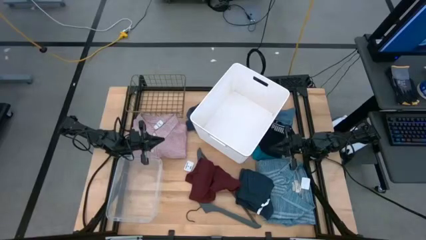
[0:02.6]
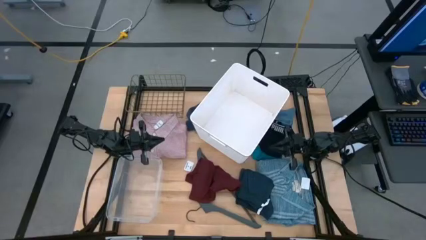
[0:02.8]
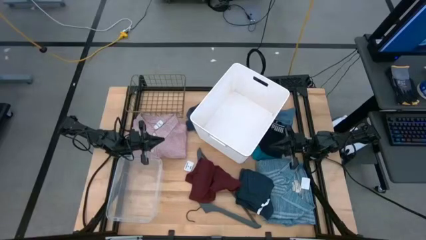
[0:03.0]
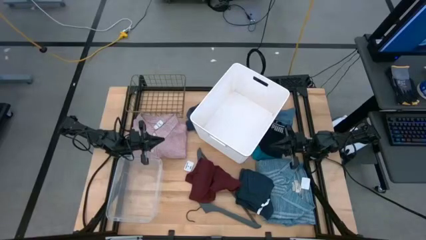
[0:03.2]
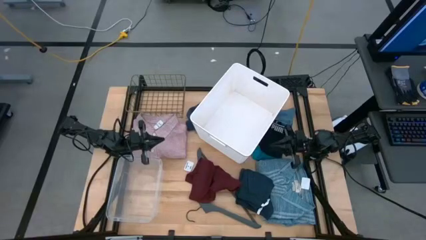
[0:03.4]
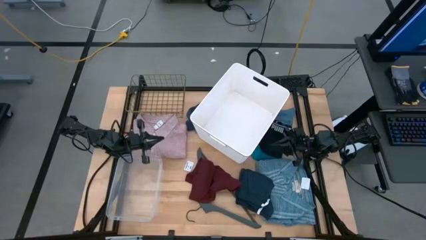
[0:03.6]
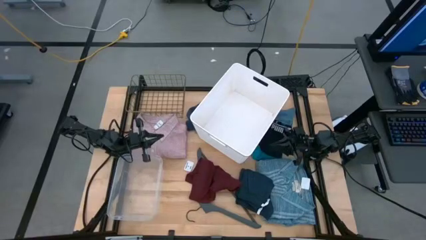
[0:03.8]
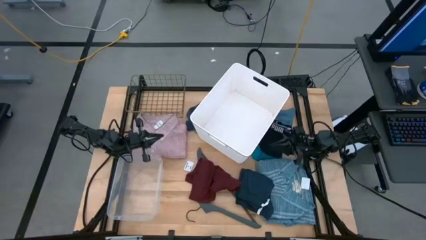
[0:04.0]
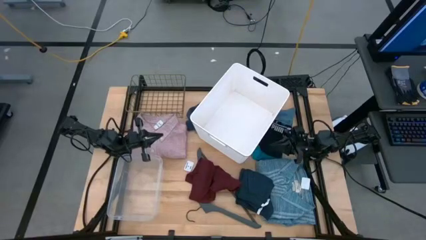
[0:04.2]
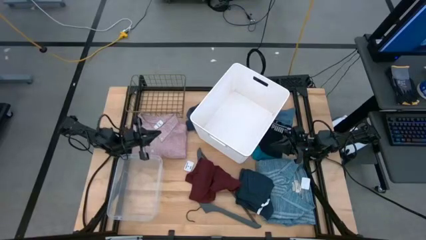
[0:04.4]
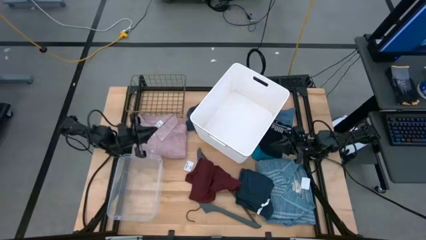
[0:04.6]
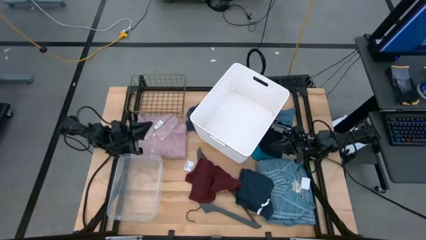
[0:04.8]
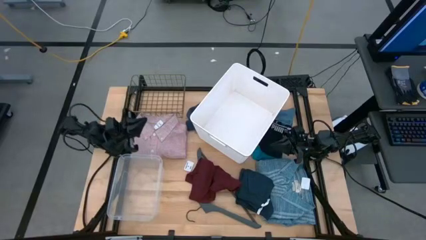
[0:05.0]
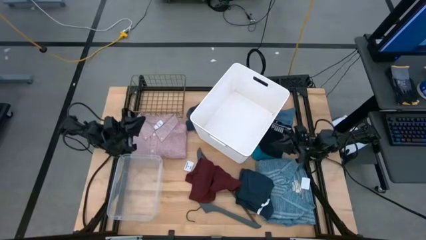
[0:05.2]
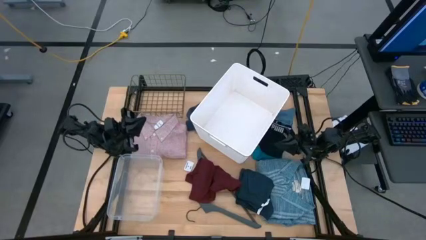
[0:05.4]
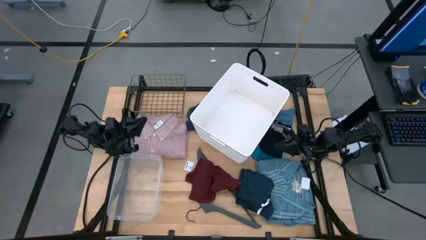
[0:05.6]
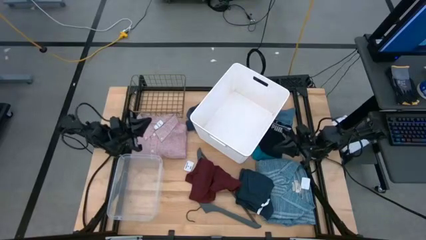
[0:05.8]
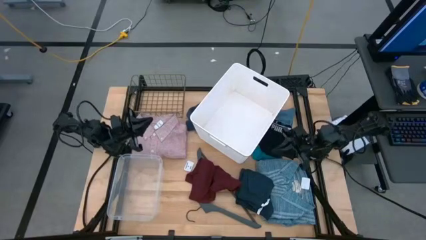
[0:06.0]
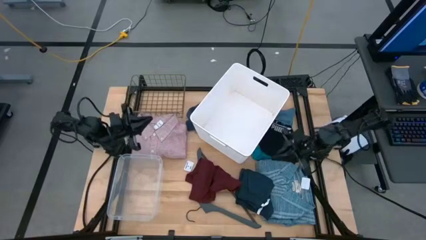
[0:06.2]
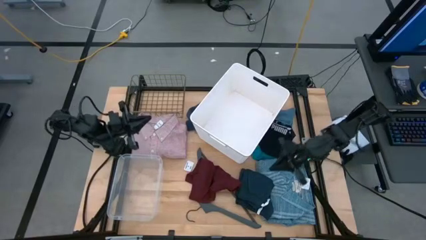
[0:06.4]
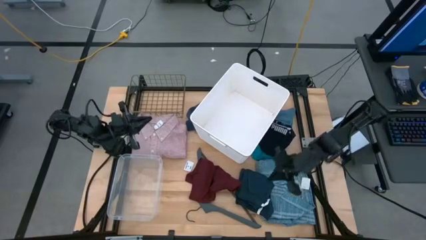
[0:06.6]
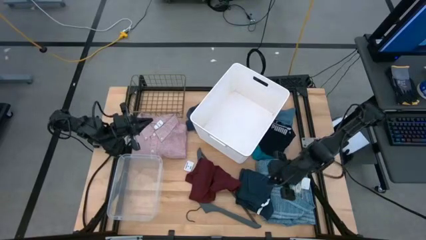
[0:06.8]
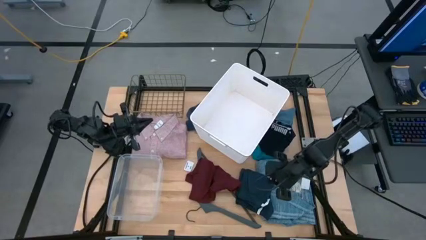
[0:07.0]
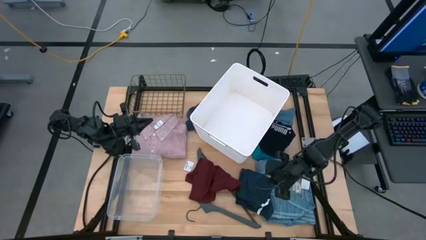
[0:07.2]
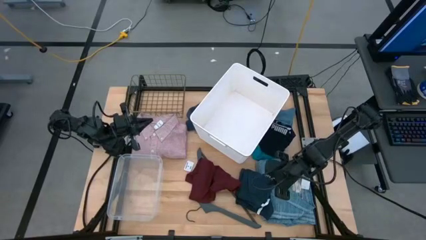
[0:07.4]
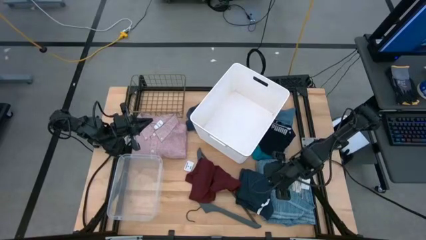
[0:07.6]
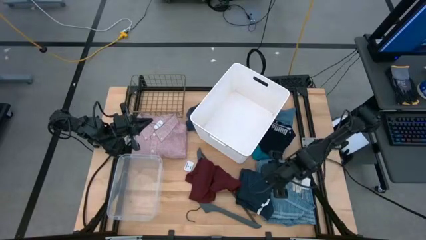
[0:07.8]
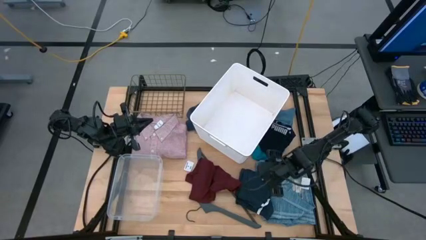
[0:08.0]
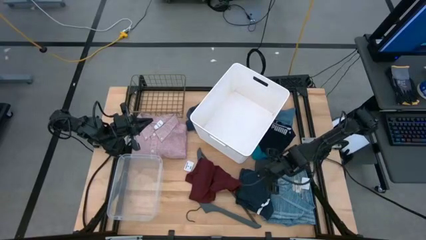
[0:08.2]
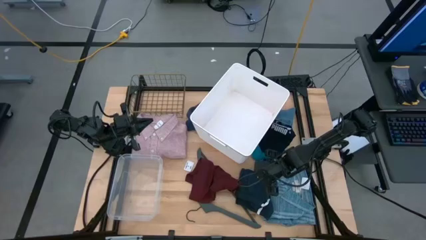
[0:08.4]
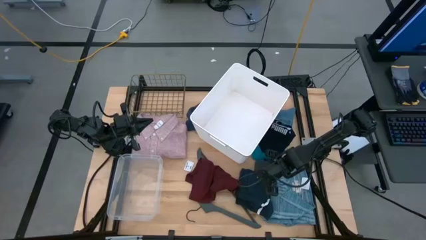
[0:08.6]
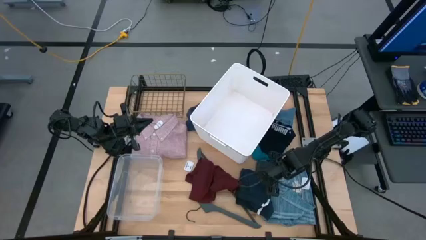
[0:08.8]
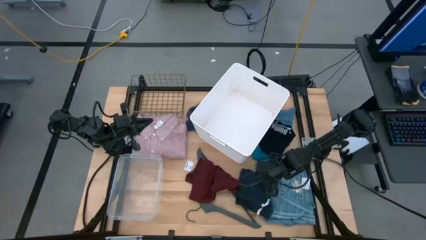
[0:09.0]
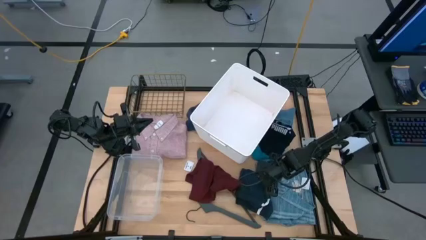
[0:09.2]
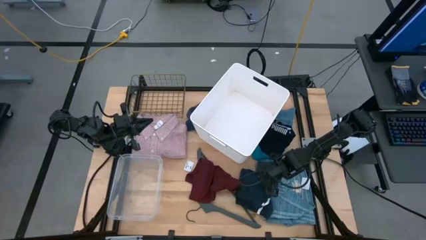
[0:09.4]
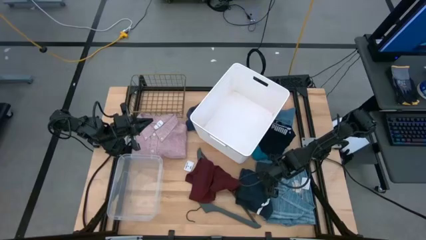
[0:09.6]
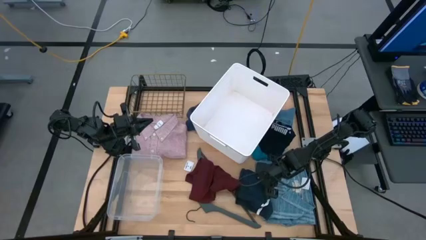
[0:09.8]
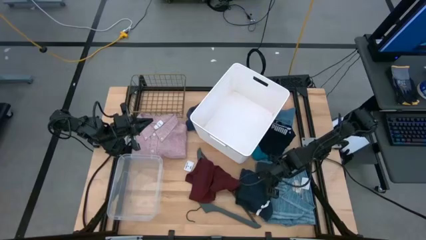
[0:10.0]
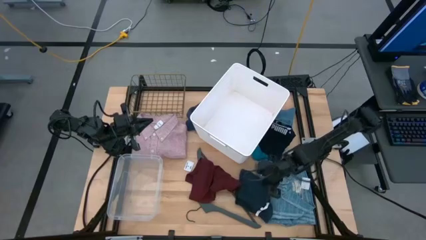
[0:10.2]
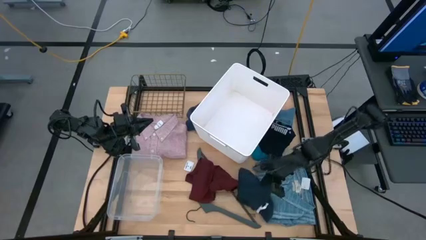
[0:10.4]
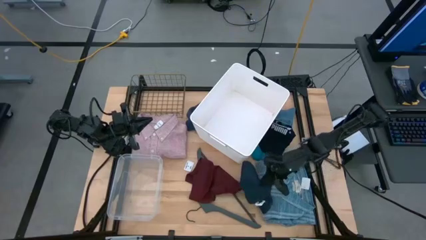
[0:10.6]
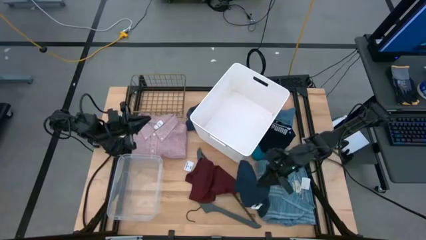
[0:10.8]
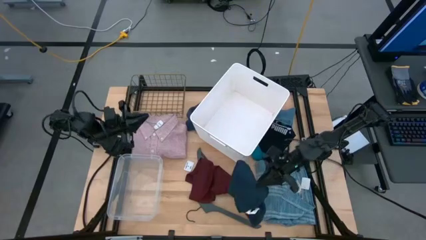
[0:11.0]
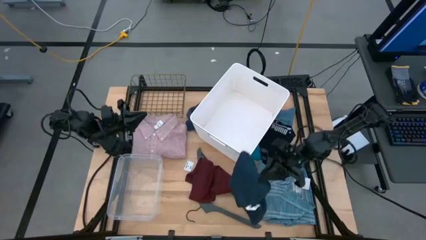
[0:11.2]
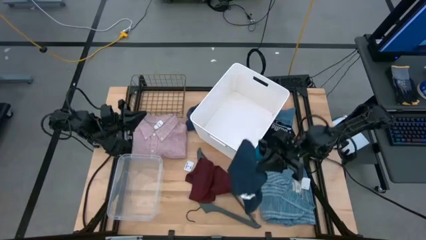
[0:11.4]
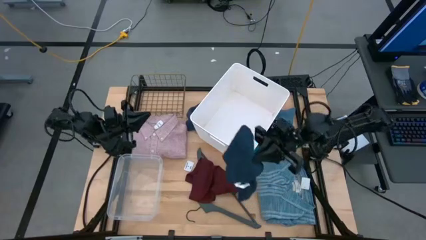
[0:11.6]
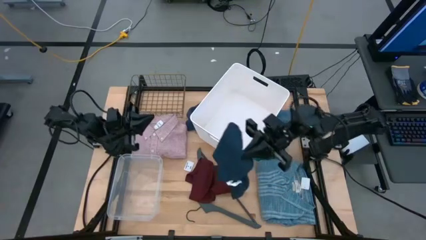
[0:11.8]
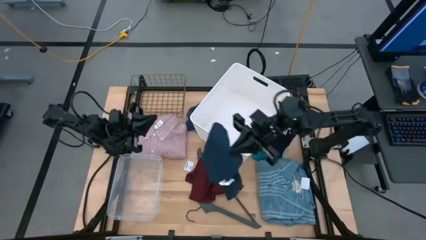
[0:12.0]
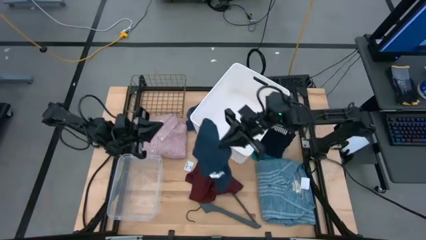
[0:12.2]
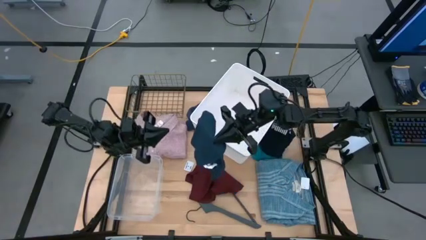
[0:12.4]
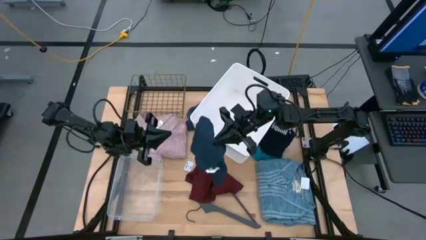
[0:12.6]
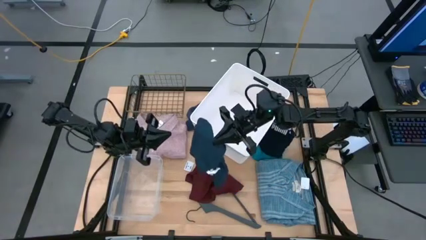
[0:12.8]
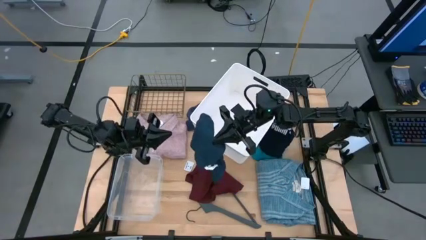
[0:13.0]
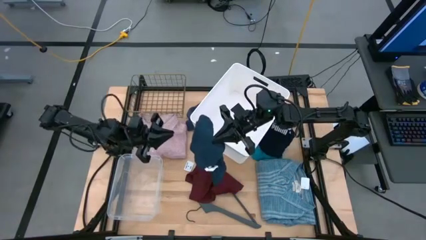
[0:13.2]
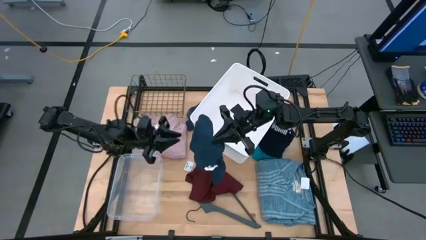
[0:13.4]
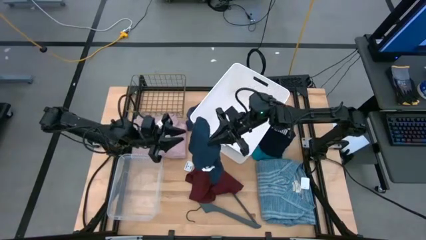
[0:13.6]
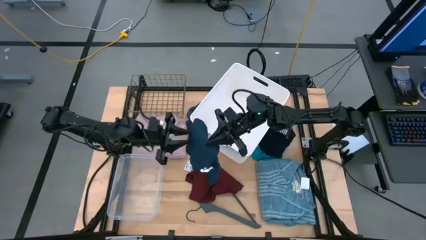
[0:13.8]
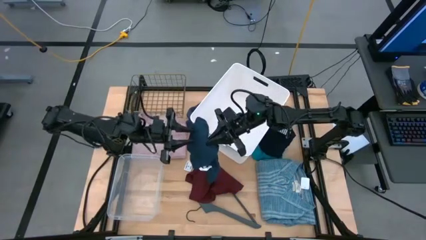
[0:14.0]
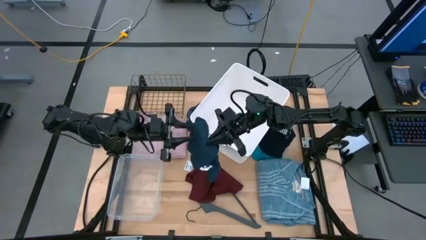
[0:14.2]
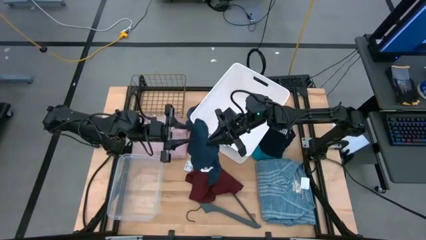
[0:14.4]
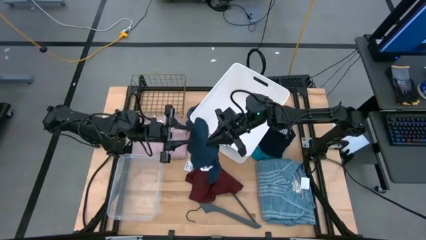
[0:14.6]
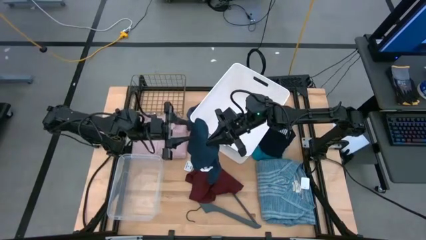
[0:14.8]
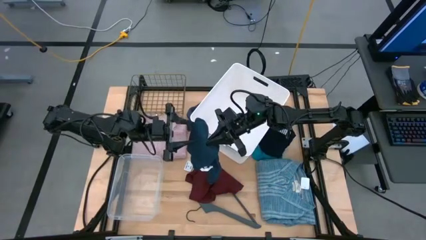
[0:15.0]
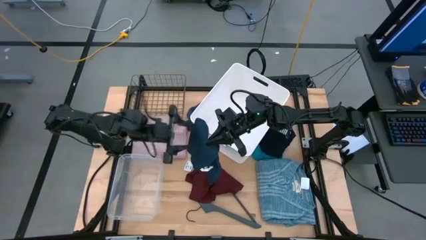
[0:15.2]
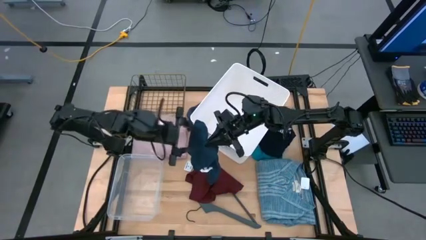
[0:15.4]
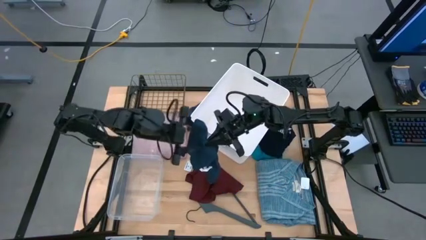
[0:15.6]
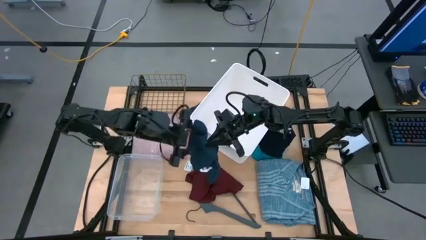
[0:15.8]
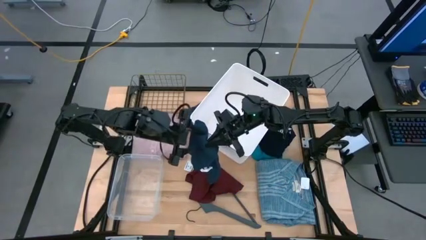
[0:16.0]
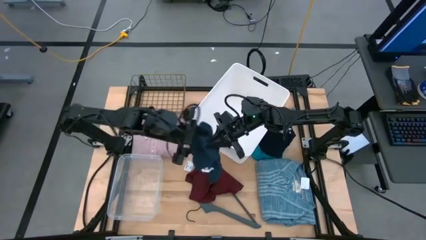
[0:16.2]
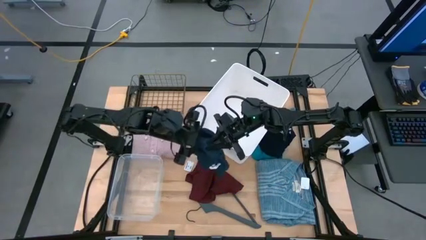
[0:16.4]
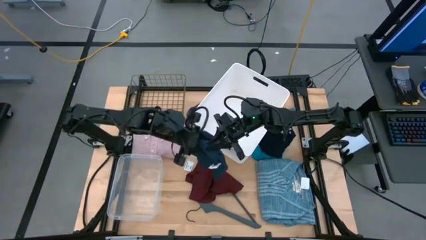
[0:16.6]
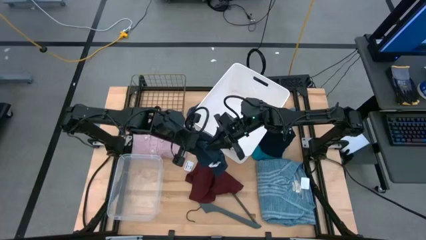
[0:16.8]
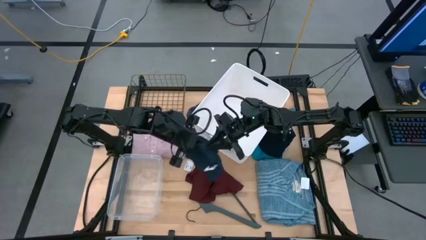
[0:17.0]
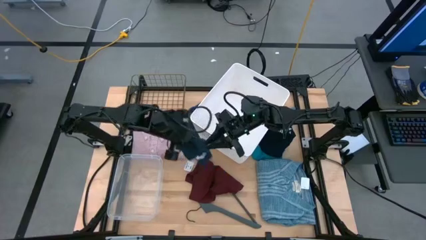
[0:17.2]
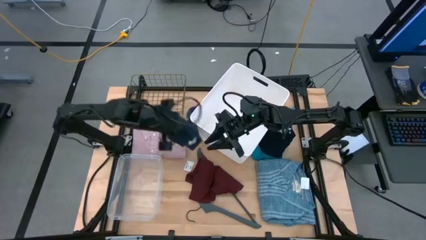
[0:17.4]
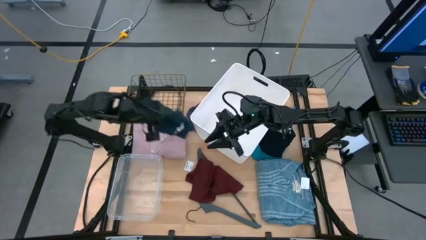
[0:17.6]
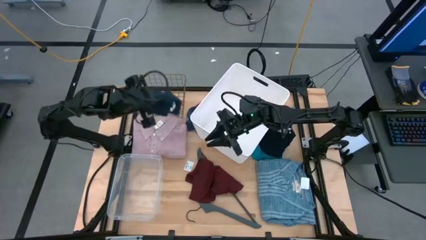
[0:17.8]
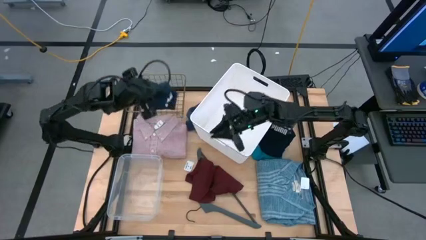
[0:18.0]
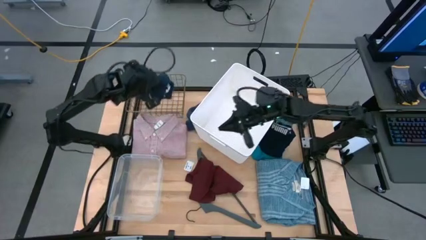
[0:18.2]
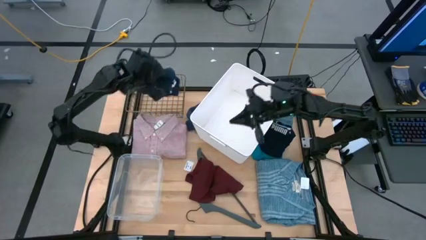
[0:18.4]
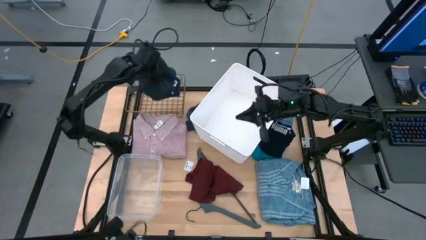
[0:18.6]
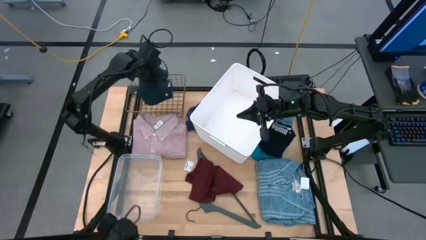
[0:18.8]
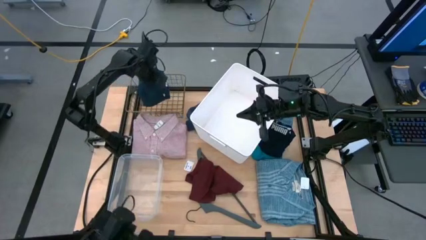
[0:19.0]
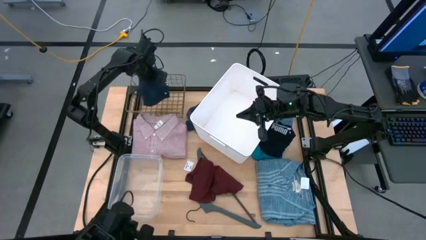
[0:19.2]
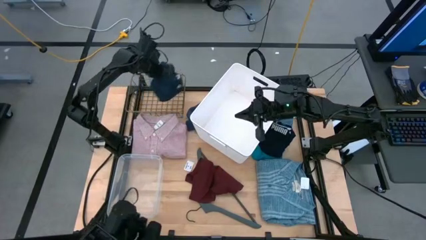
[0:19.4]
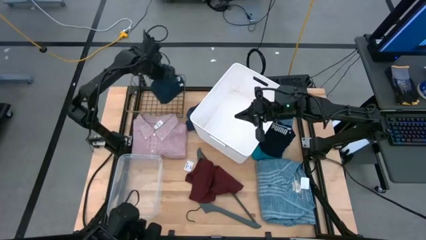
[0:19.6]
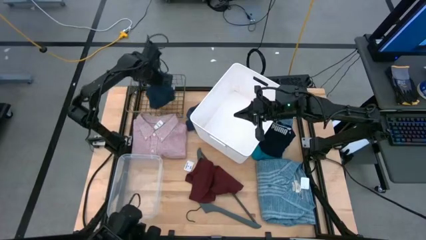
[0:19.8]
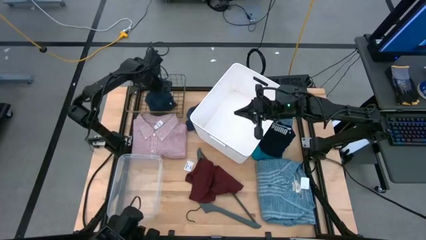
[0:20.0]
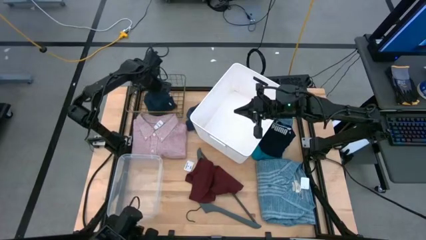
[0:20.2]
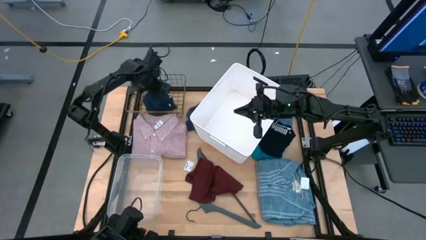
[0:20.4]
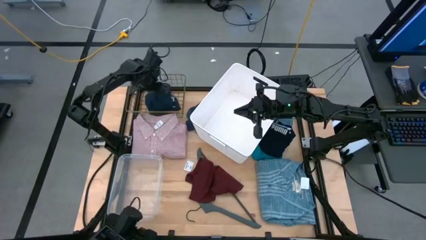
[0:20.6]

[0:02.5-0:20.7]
Task: Pick & Place Cloths
Put the dark blue shorts into the brown basket
